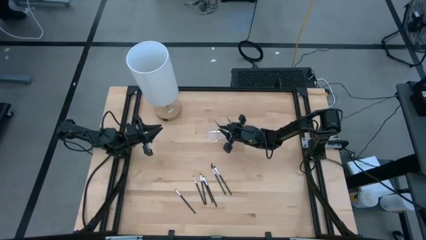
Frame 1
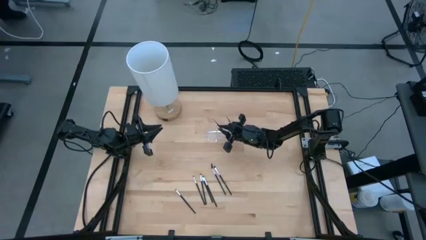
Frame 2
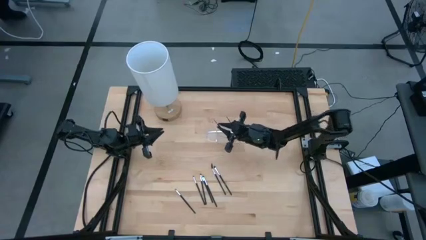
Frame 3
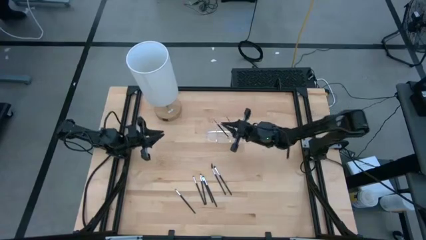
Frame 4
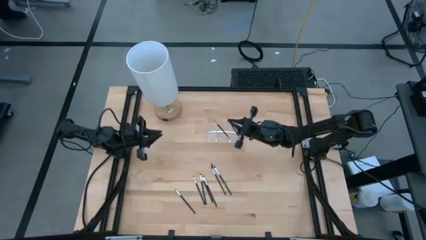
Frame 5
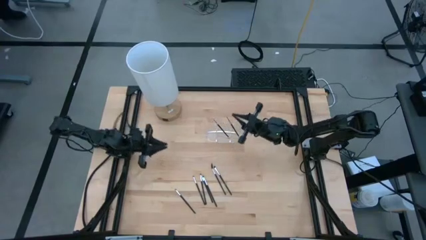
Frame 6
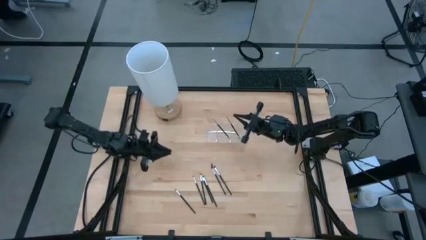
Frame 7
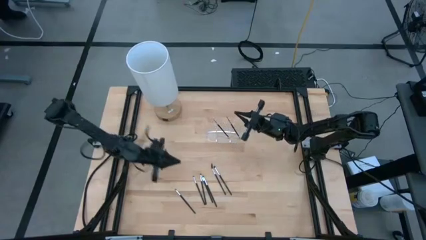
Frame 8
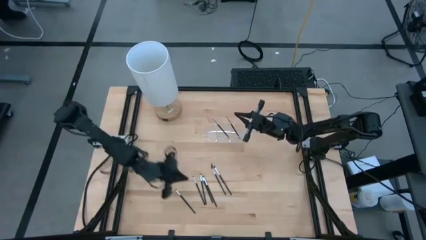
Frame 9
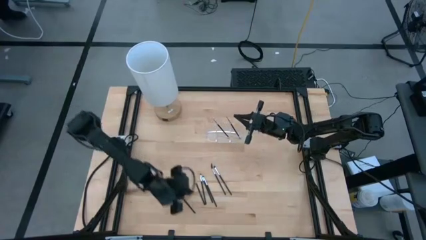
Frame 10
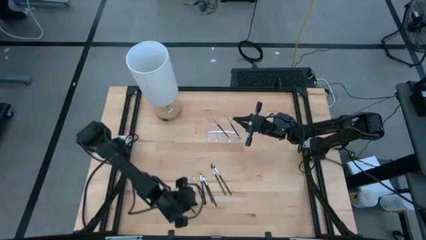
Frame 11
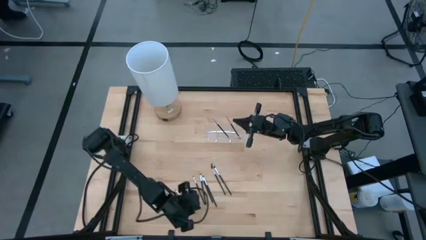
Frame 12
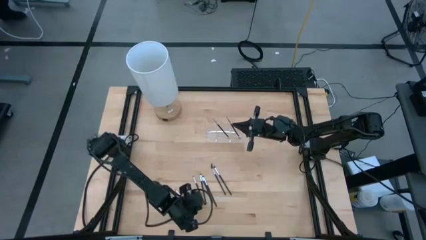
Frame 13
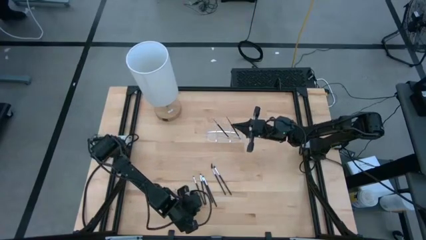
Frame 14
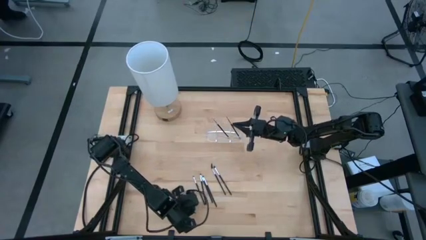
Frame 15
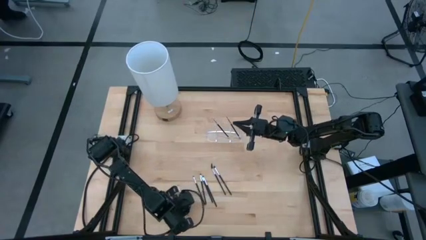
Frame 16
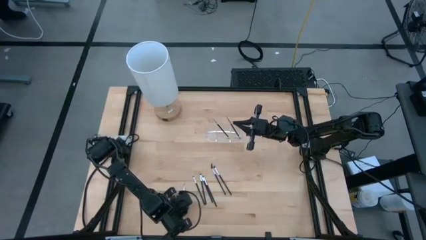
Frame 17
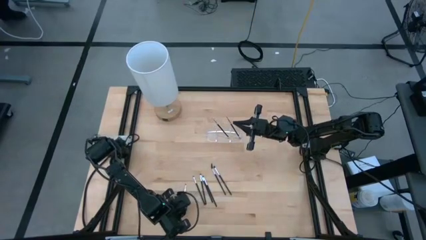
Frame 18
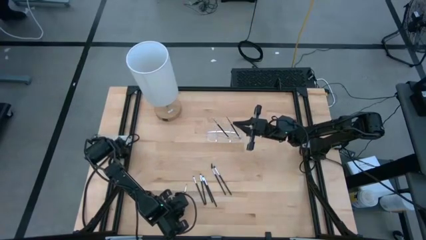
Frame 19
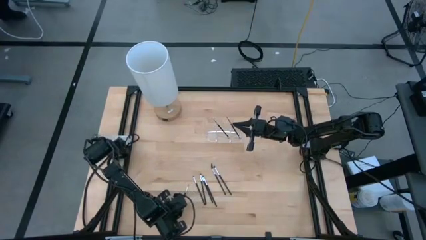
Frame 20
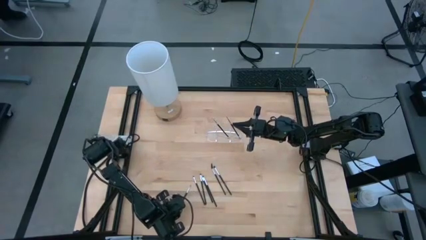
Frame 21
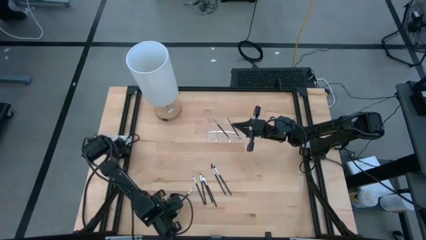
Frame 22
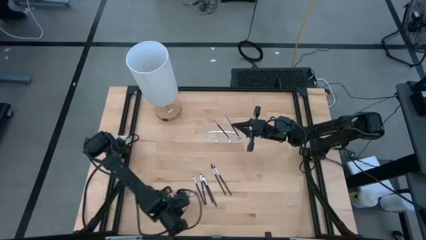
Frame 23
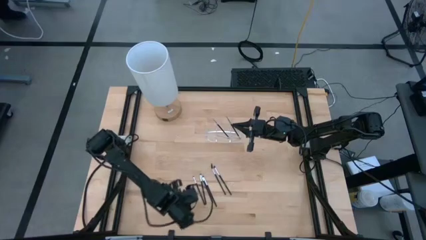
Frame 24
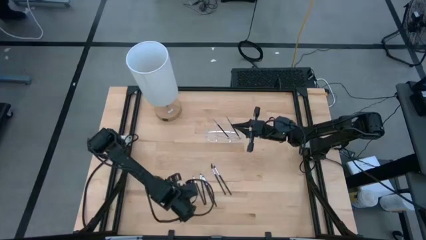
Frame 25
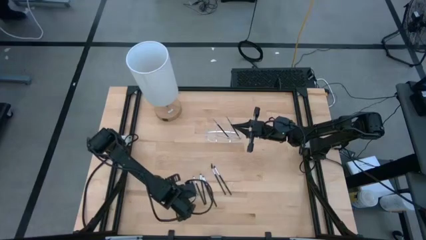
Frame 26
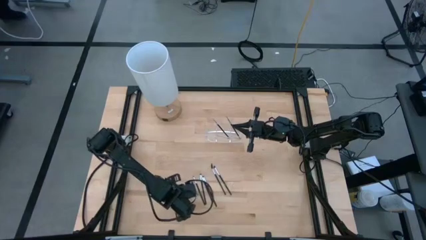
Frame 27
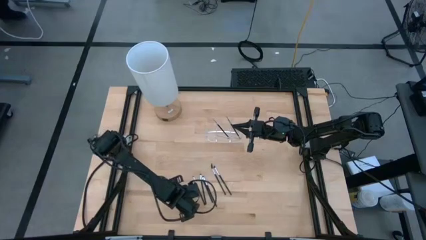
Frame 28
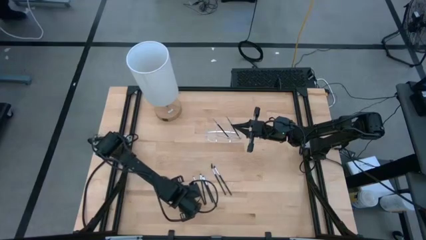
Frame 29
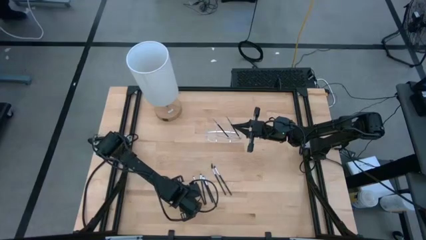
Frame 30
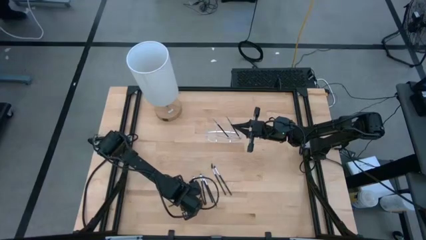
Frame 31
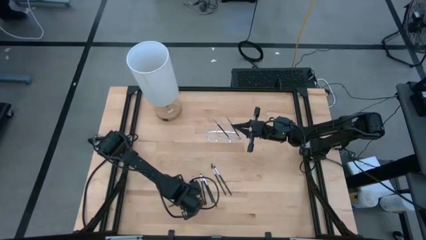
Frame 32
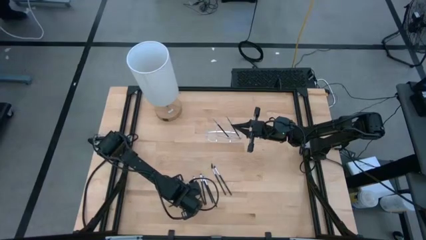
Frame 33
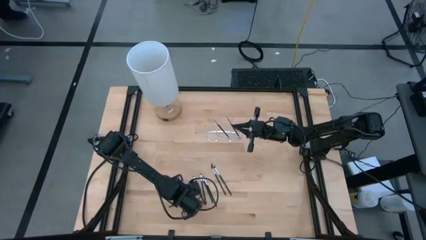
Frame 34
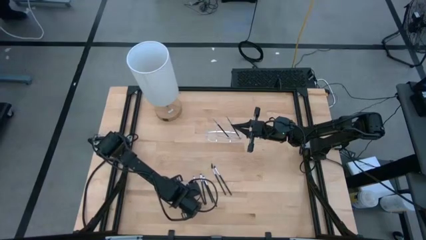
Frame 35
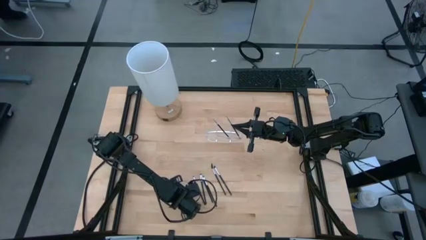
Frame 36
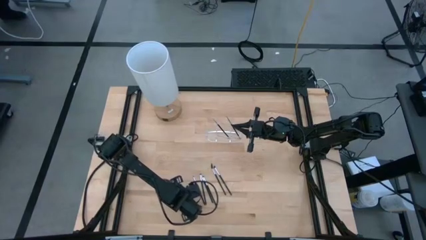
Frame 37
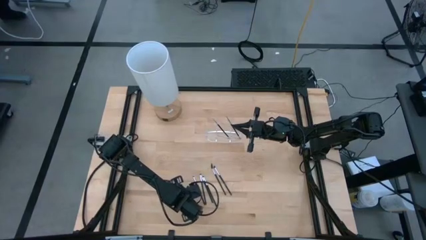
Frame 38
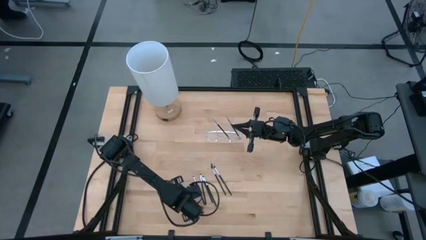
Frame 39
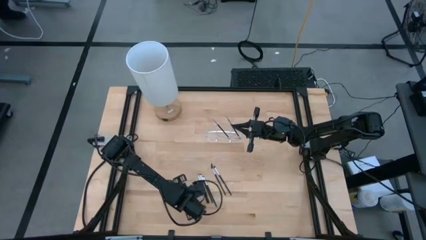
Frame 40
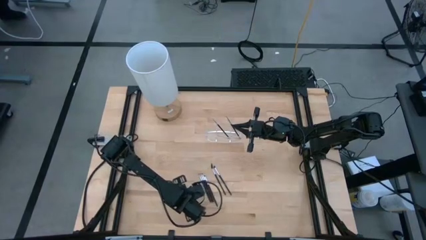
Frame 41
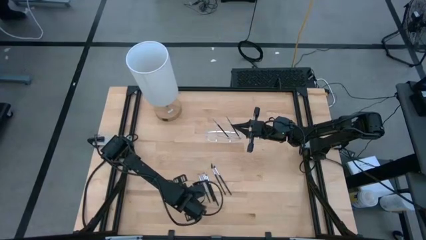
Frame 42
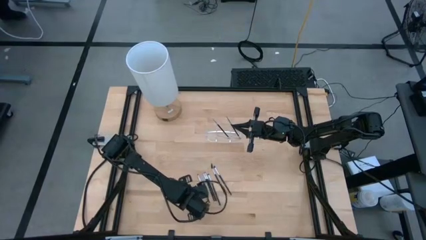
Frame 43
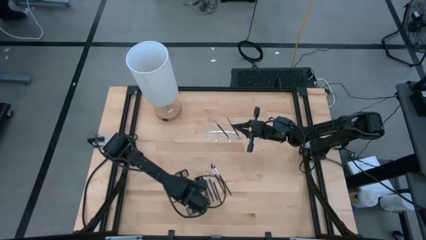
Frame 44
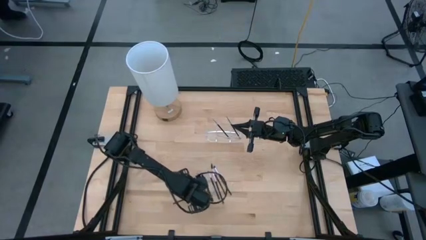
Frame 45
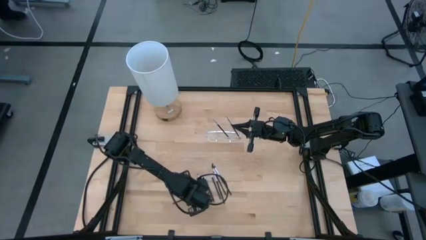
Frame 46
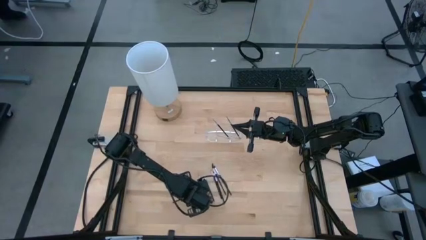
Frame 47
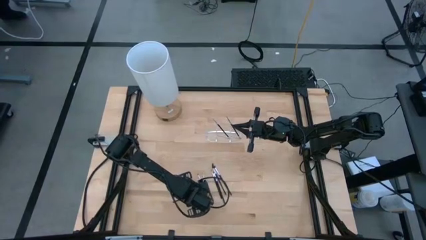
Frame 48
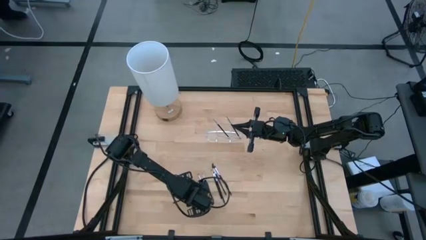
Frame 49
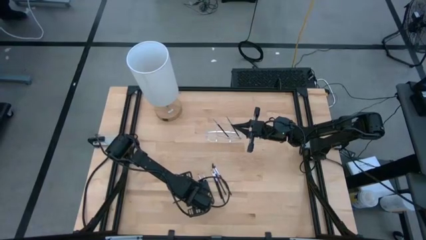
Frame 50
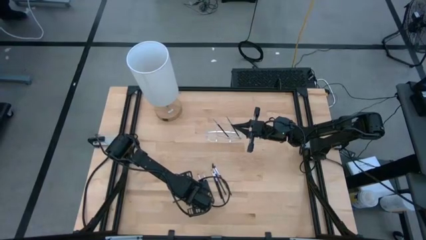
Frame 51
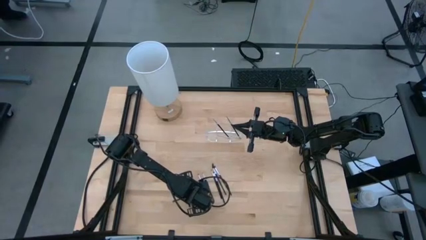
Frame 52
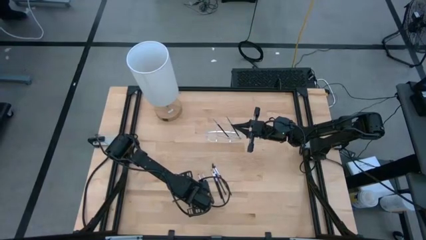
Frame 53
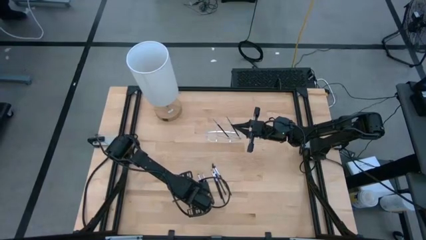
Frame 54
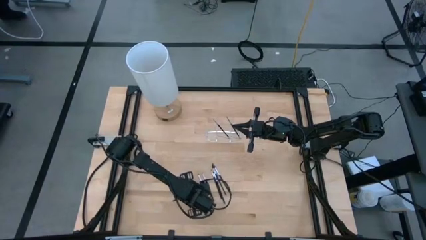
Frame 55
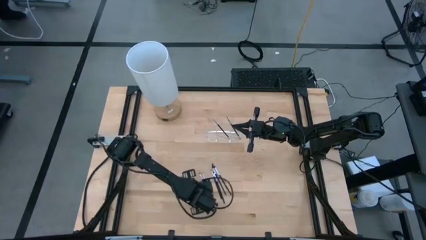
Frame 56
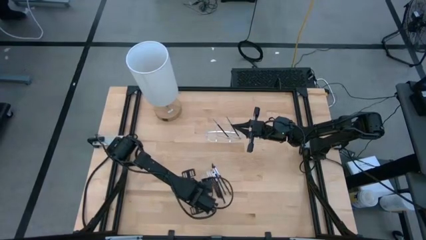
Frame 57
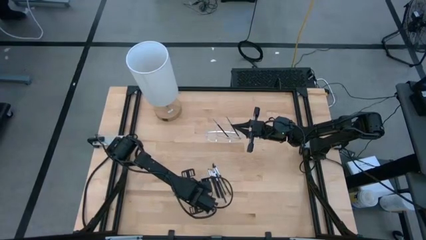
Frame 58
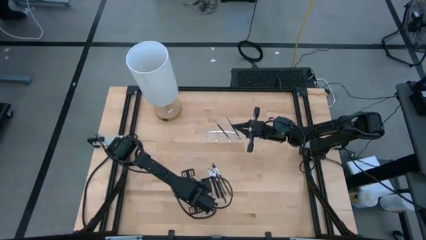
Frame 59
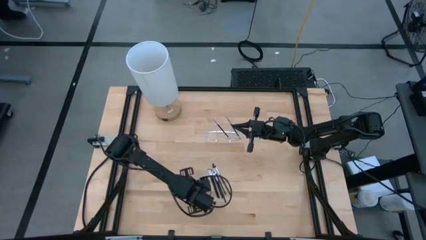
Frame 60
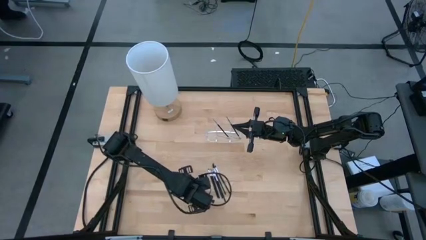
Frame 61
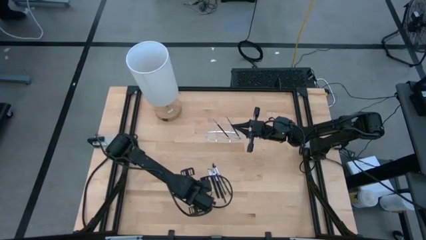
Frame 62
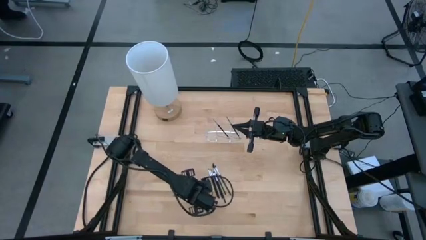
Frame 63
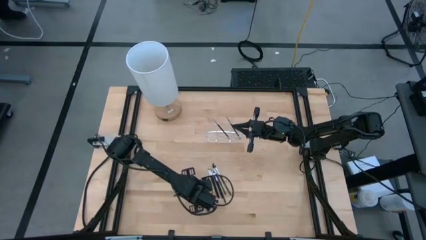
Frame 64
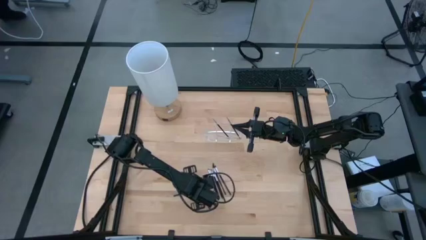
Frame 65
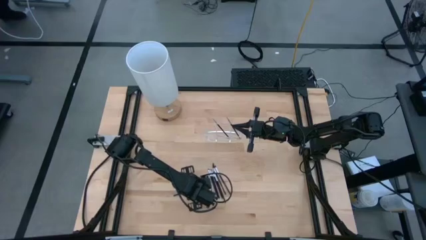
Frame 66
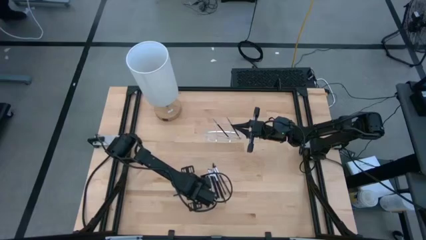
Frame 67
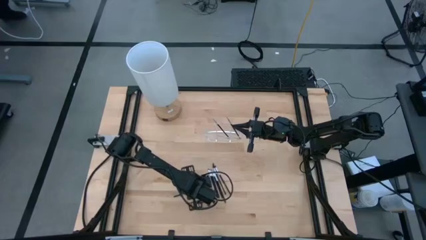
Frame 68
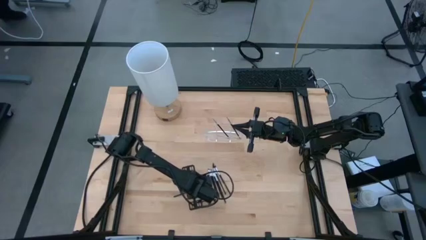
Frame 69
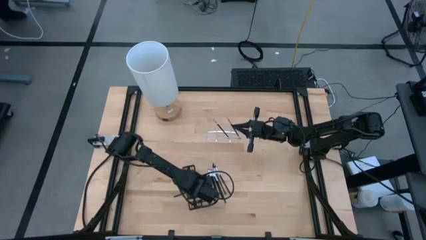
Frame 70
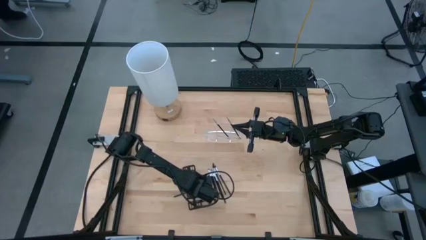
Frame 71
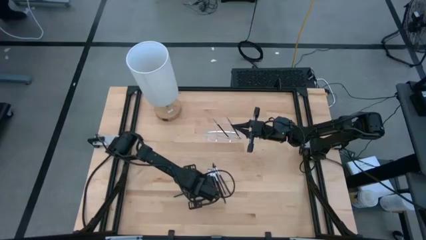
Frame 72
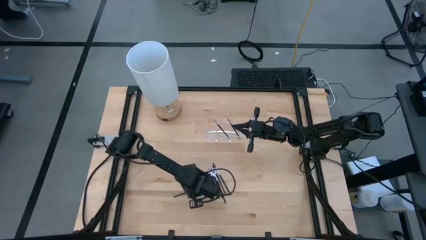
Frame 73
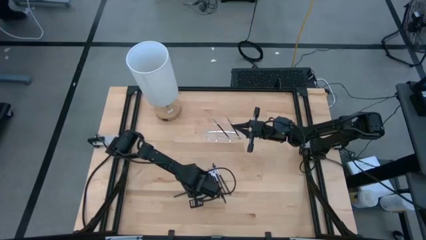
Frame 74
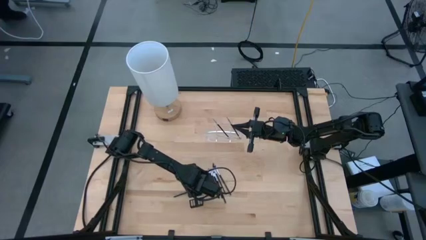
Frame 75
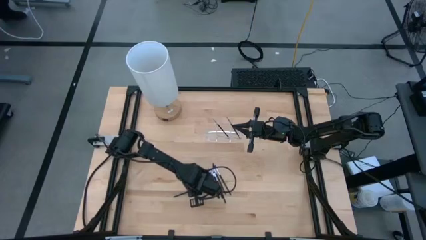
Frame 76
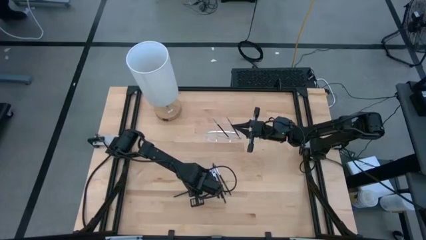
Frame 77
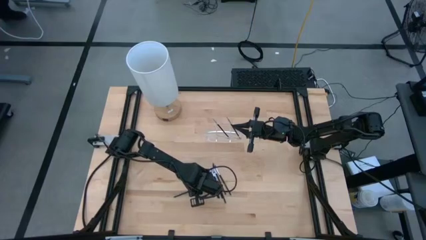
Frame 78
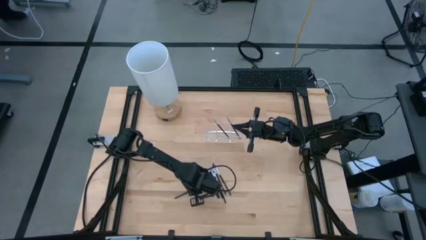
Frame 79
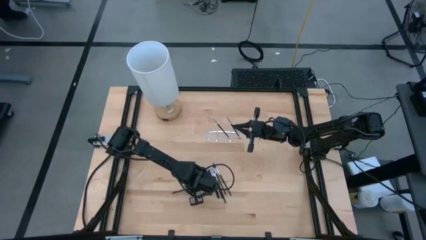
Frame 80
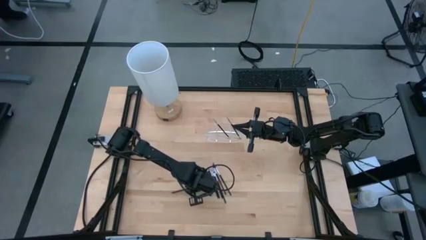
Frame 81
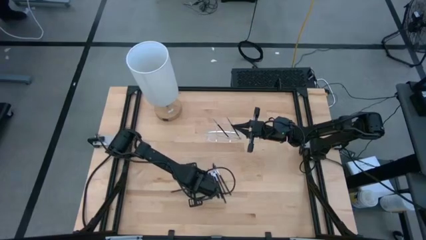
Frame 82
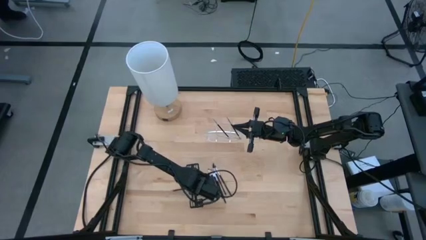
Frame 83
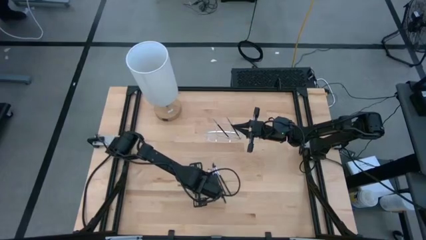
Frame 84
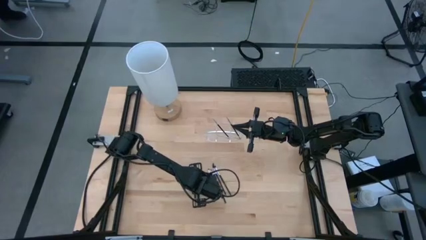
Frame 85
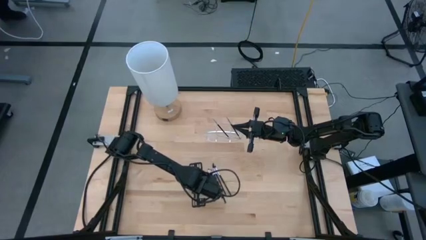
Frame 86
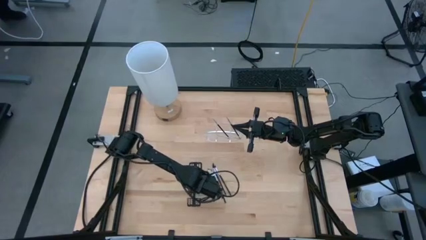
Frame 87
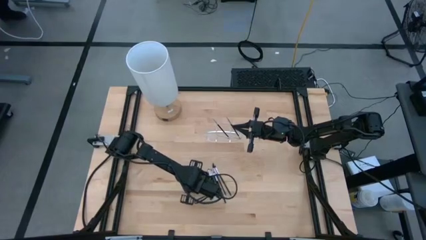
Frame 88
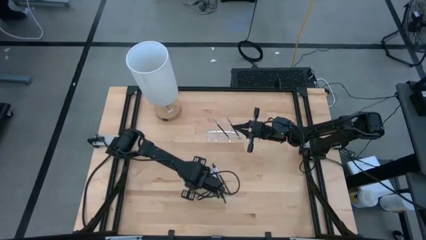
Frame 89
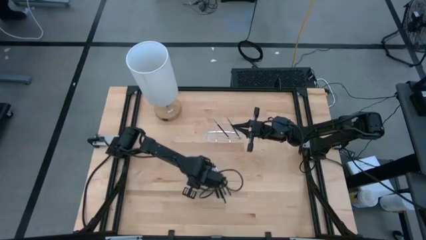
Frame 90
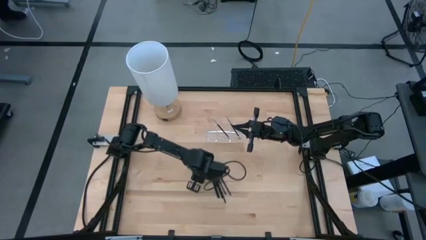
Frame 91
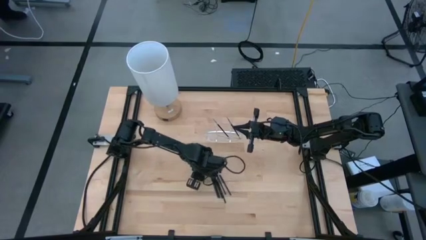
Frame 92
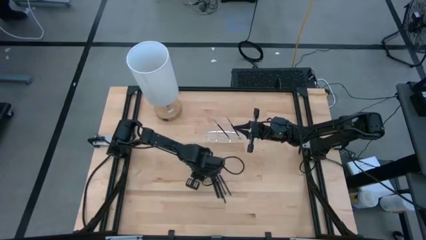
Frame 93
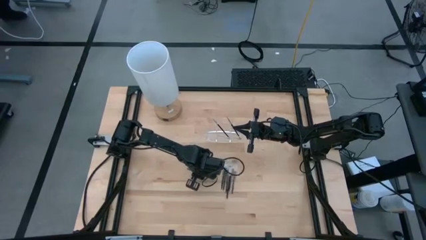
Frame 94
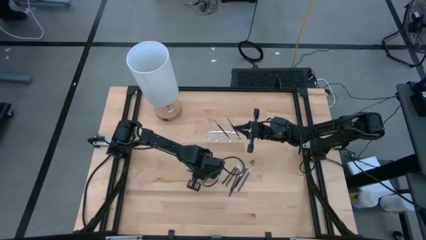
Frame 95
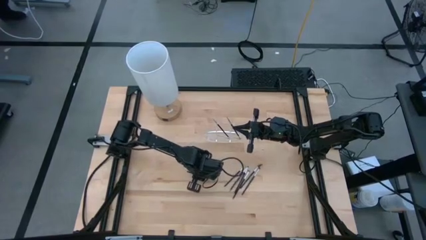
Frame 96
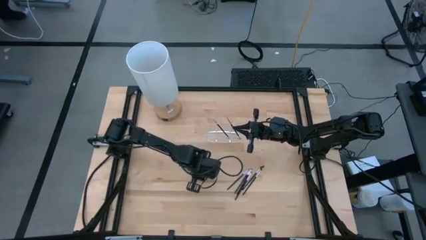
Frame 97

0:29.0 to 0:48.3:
Task: Put items in baskets/containers
Put the black eyeshadow brush into the transparent organizer
